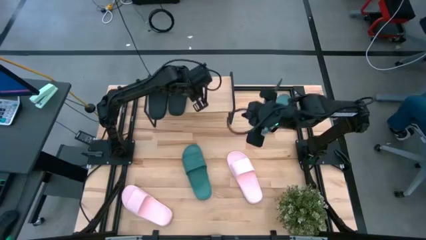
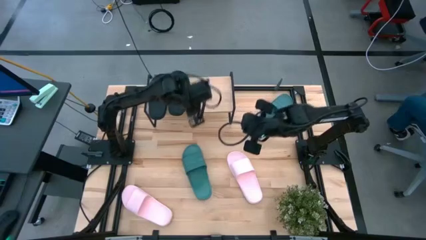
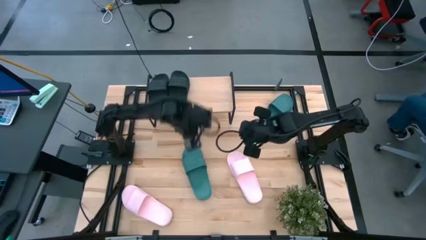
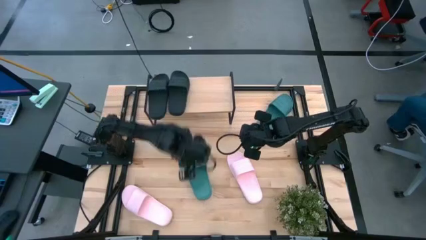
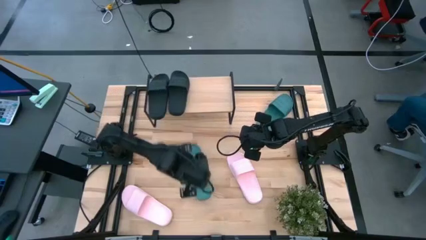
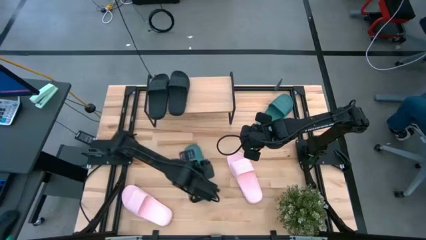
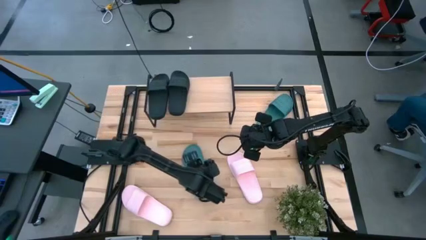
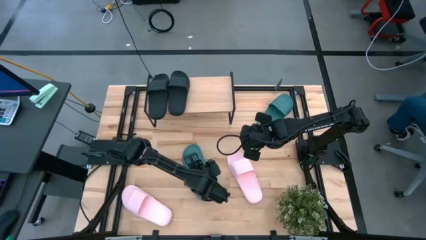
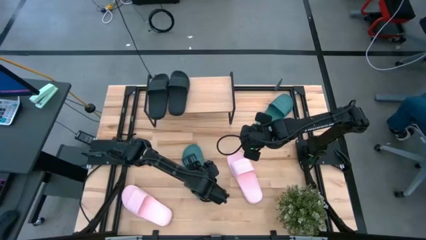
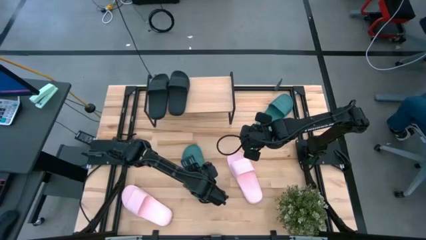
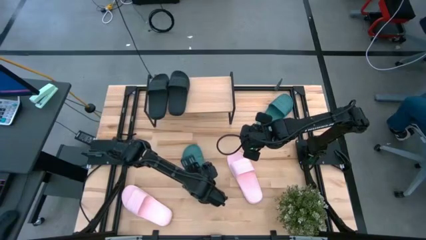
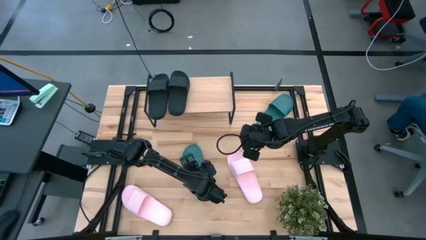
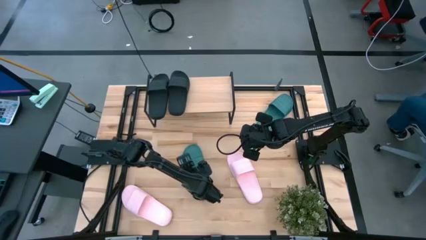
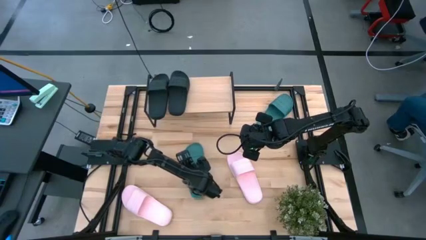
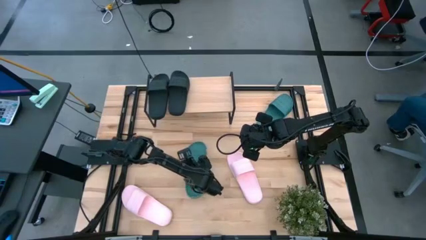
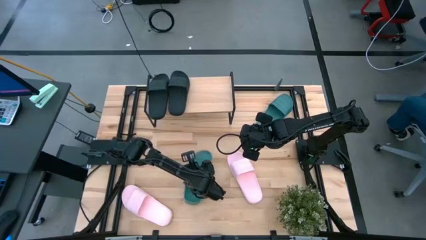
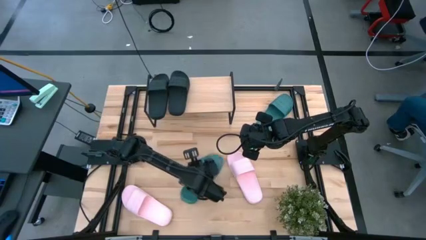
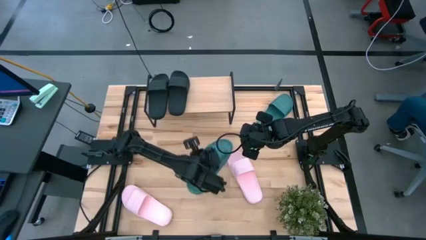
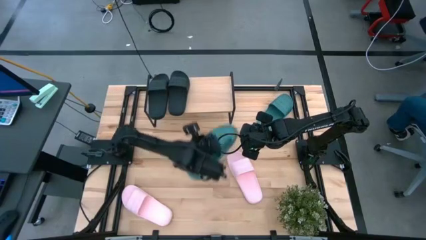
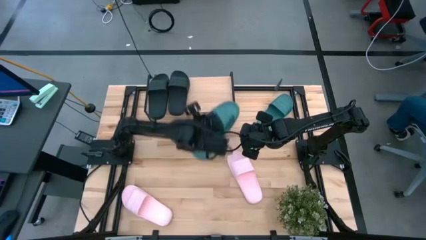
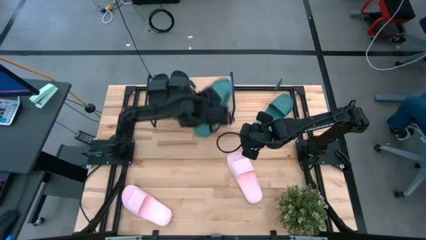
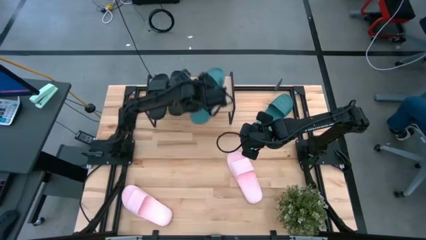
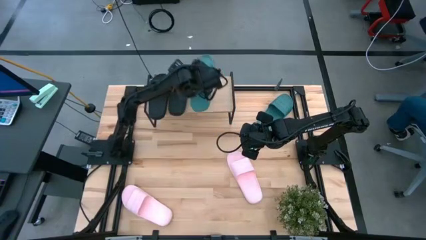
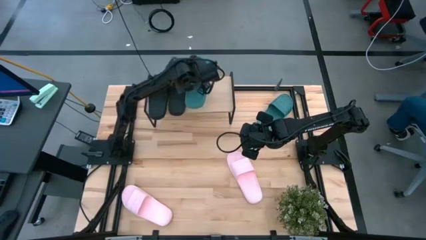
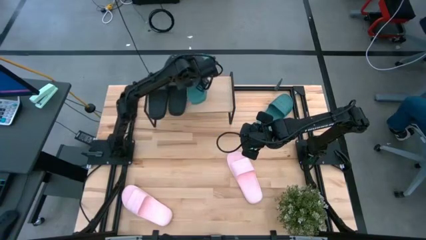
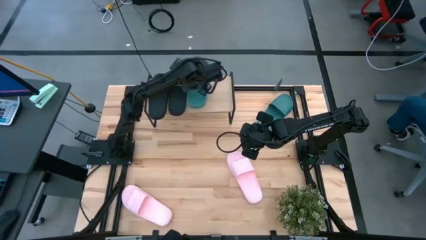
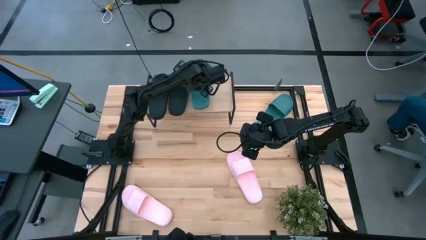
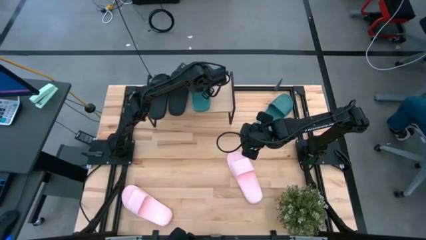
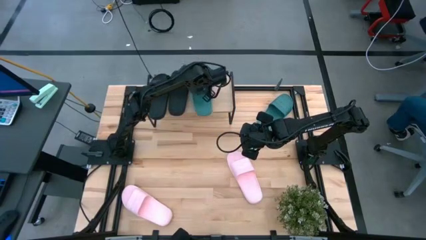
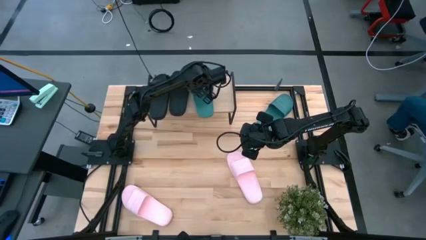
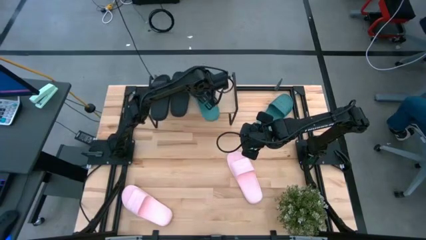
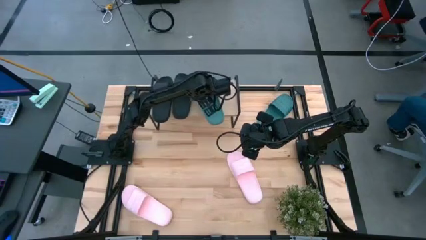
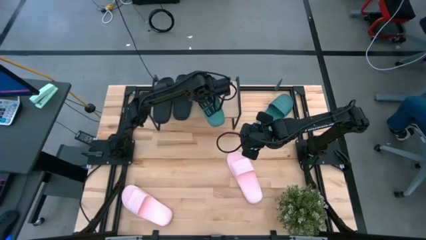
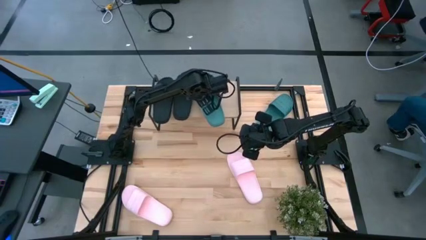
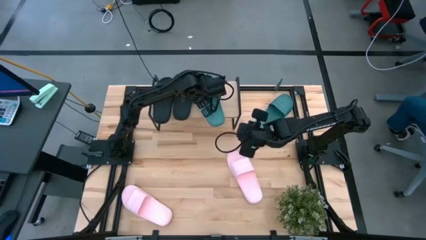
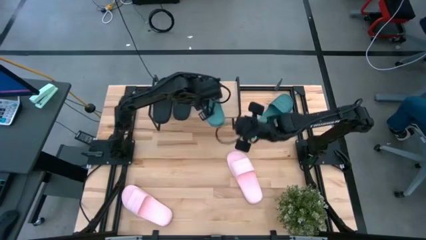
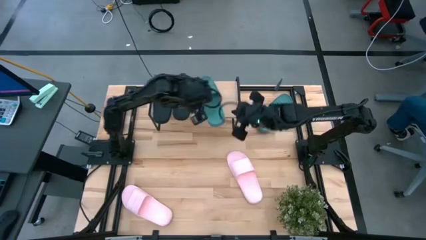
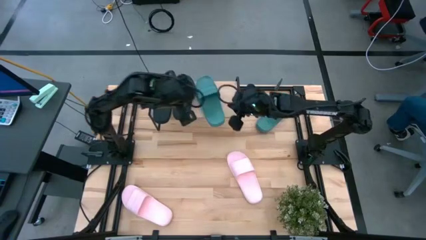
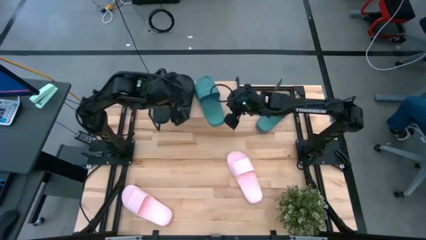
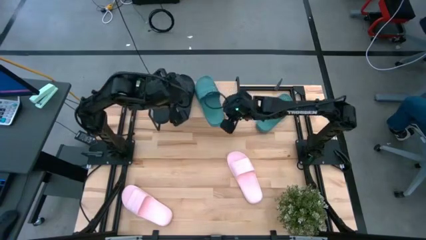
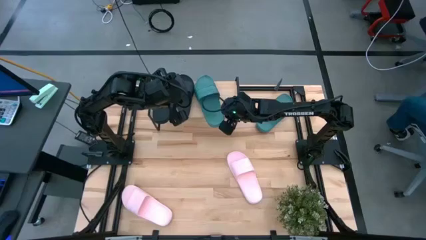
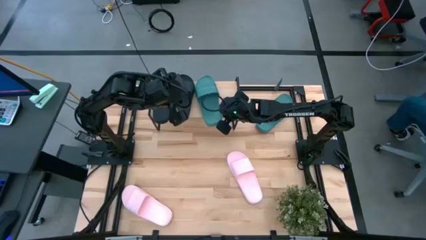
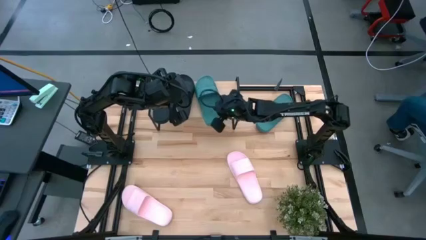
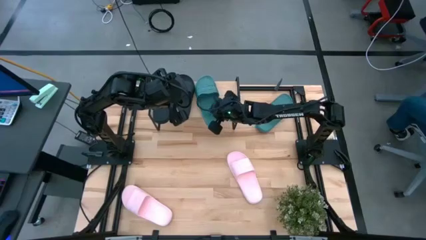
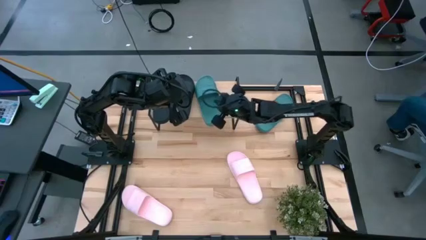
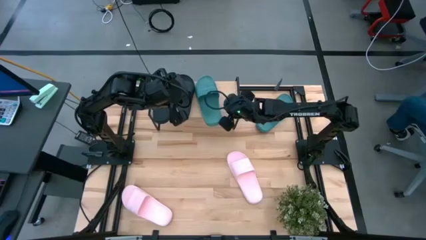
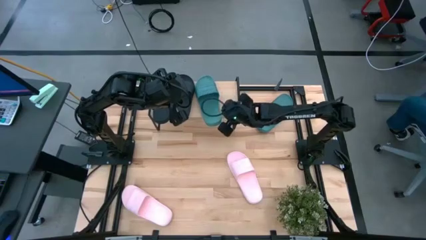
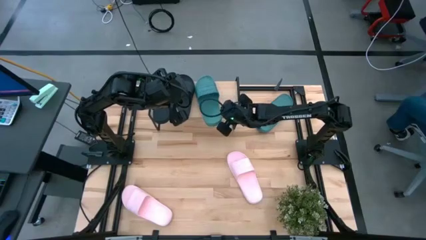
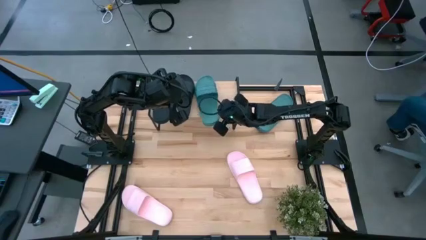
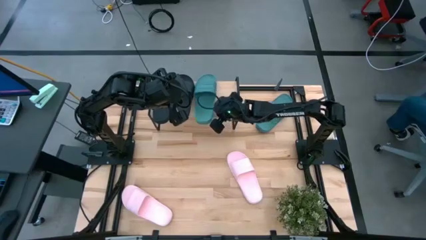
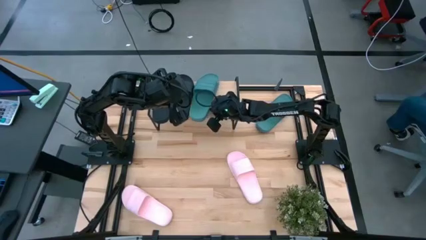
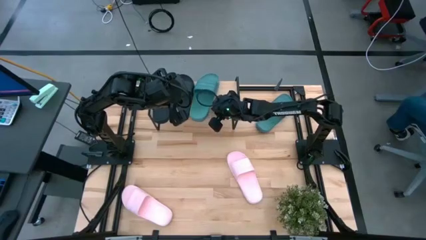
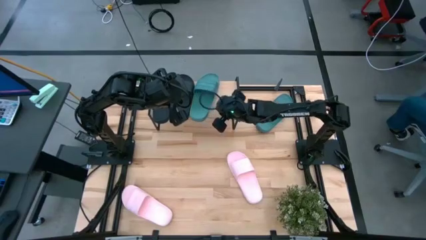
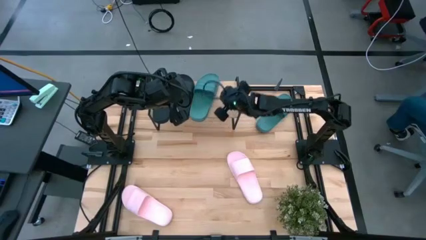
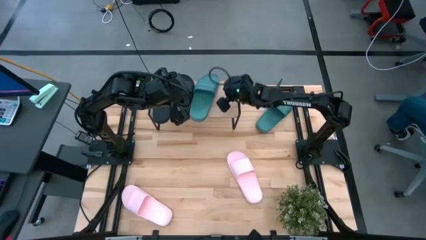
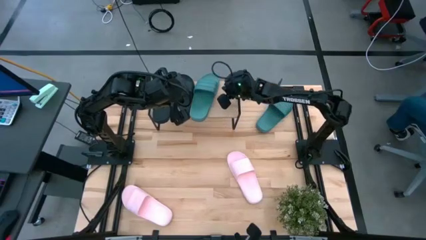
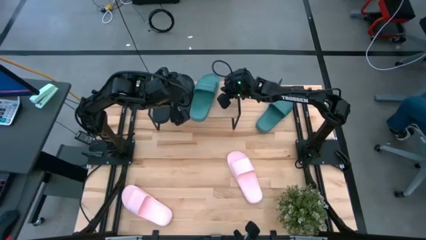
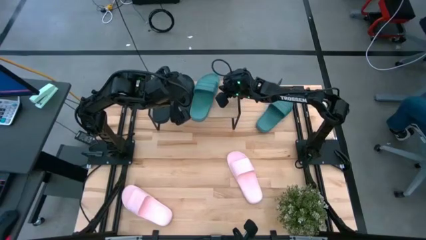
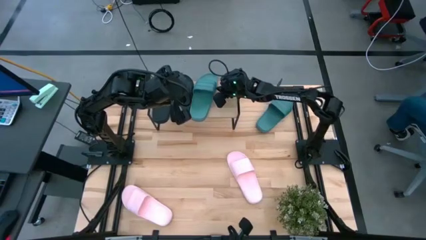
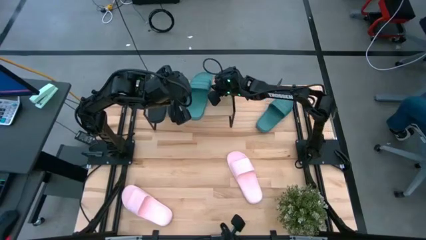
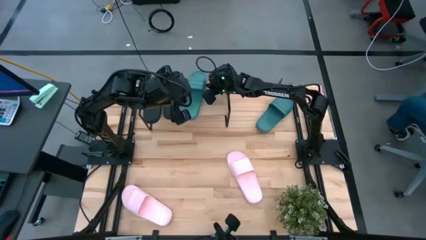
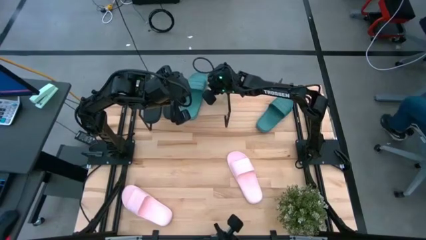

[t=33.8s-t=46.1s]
Task: Pick and place slides into the shelf
Put the left green slipper on the shelf

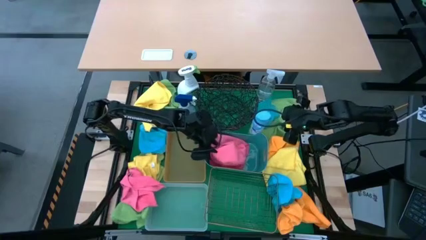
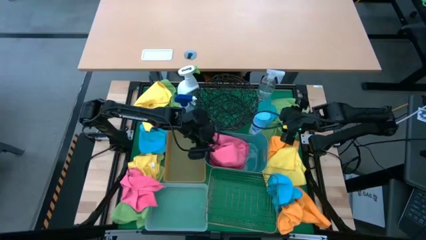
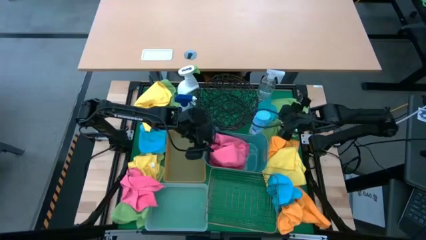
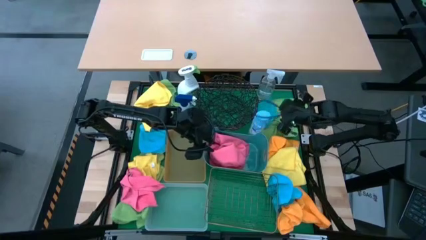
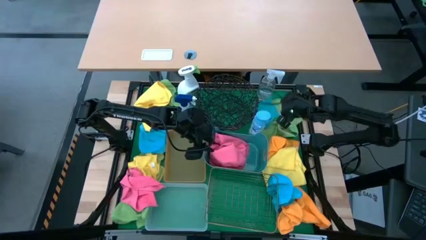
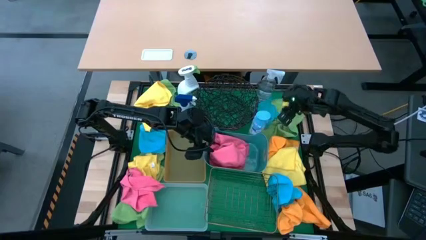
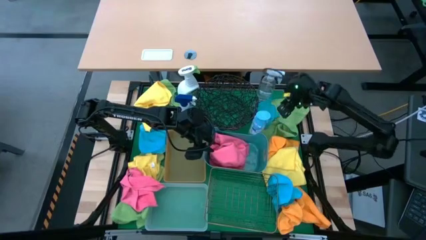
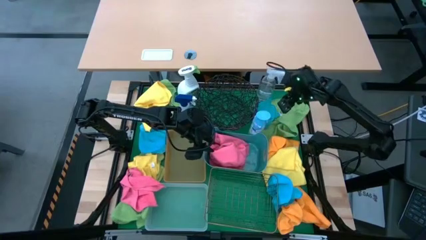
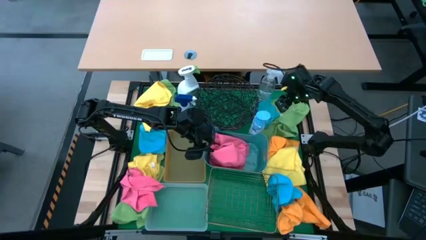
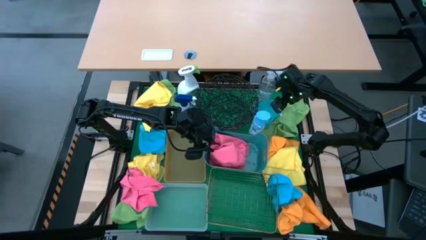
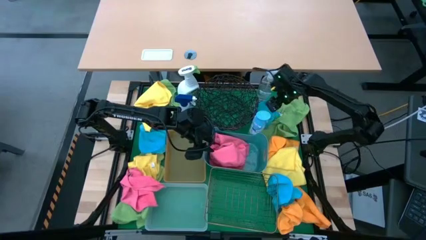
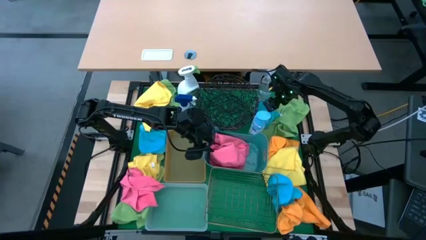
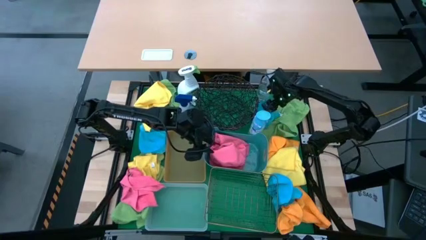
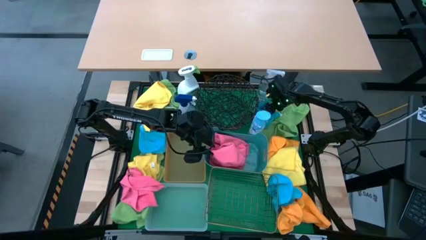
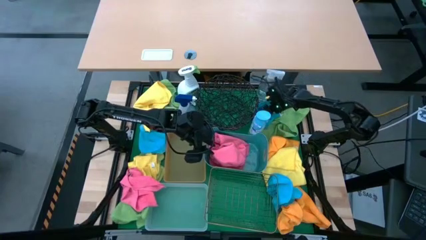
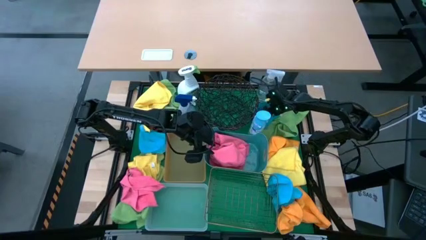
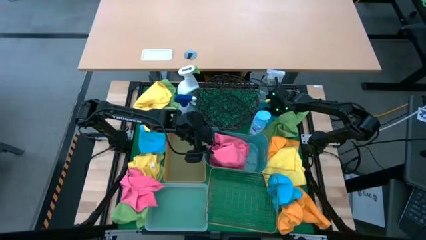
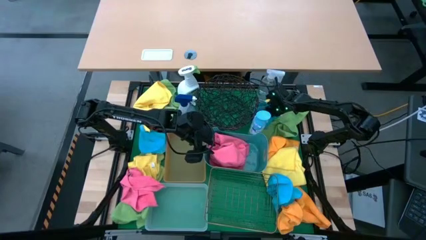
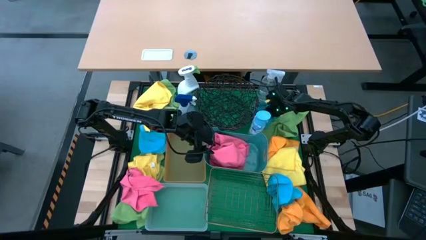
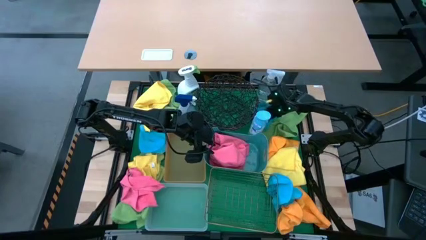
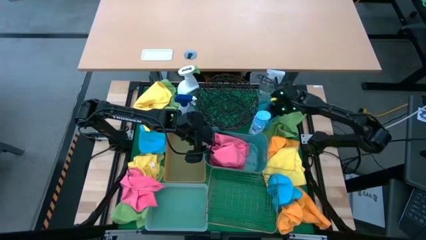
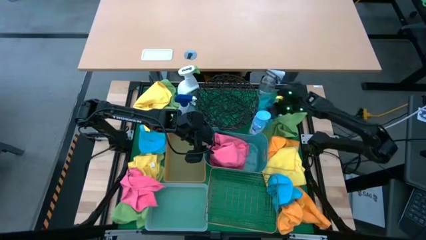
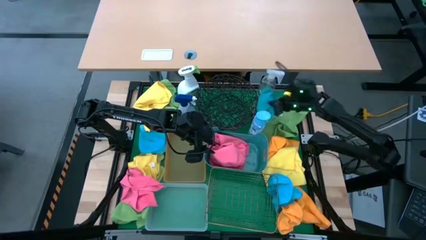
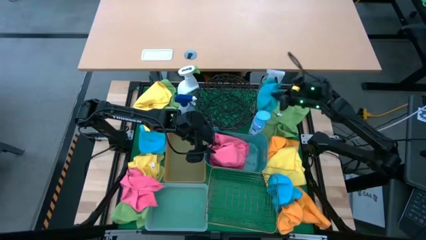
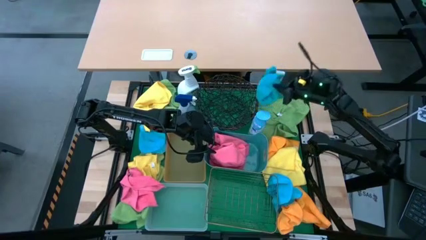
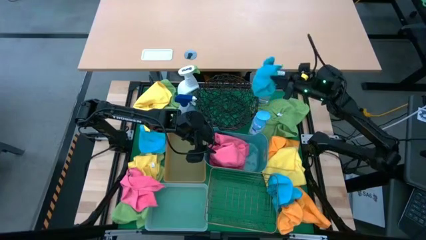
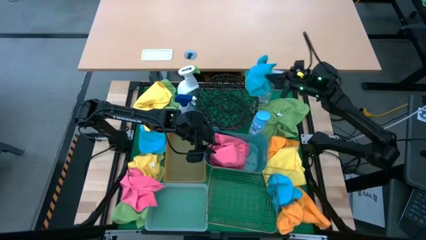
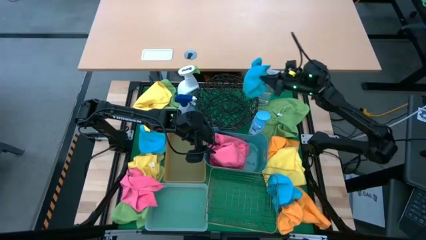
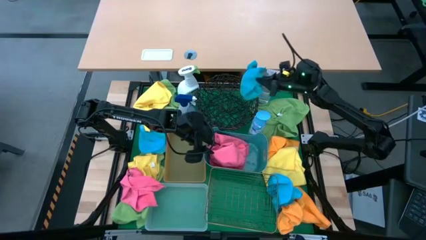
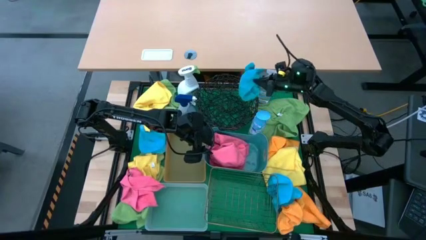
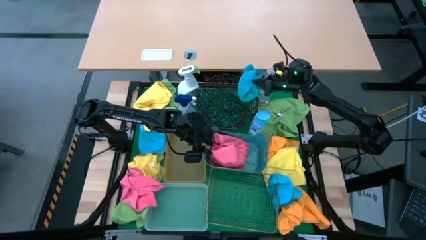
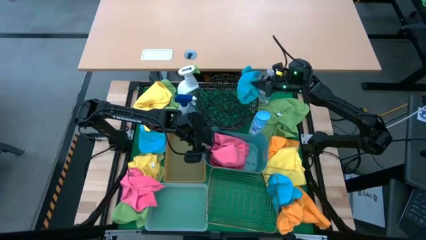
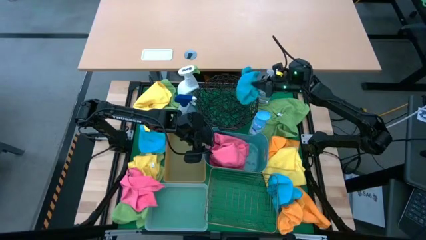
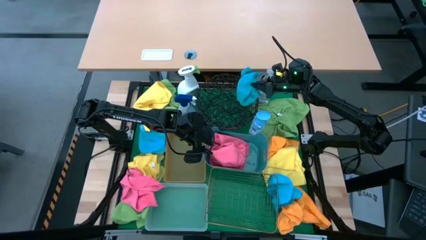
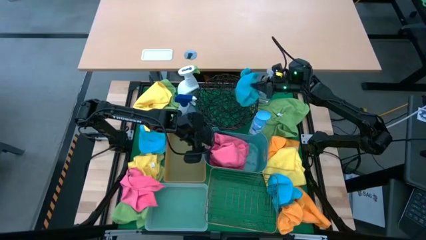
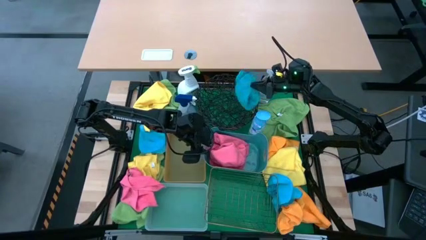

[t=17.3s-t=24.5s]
Task: Sort microfiber towel by color & place in baskets
Put the top blue towel into the black circular wire basket
